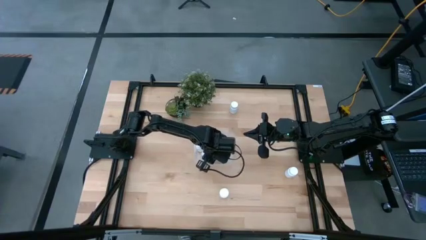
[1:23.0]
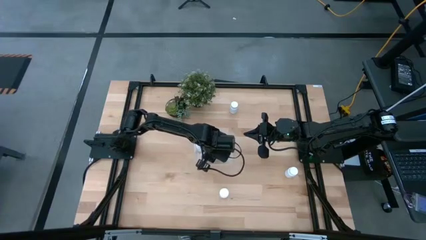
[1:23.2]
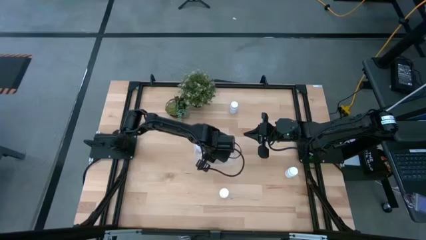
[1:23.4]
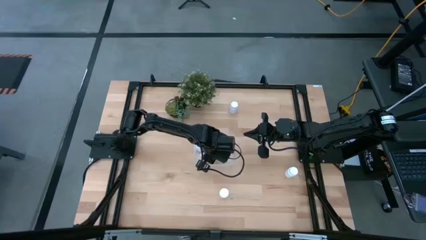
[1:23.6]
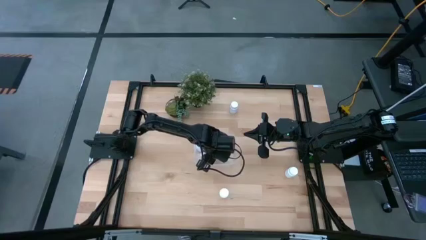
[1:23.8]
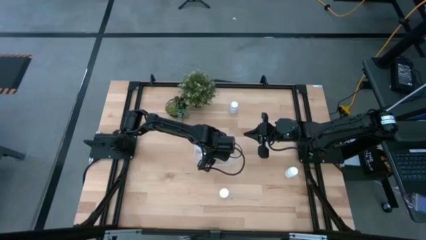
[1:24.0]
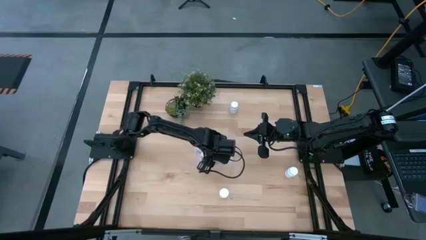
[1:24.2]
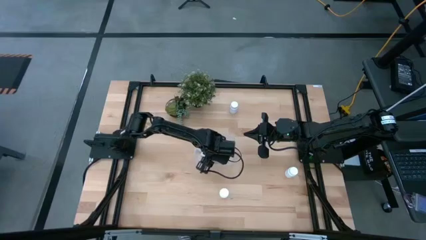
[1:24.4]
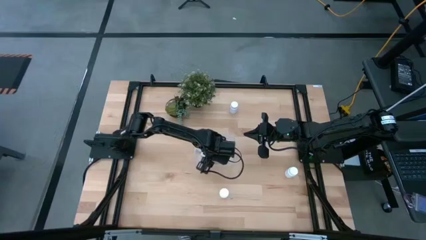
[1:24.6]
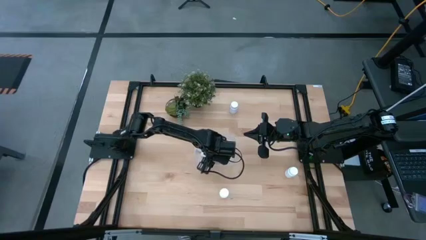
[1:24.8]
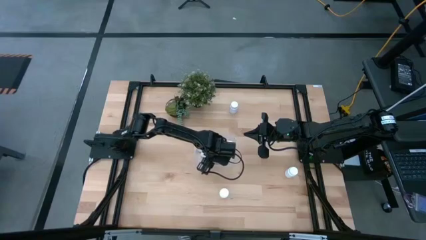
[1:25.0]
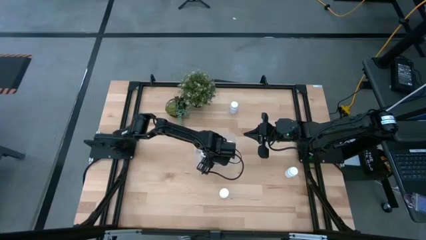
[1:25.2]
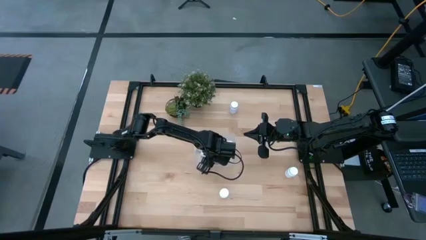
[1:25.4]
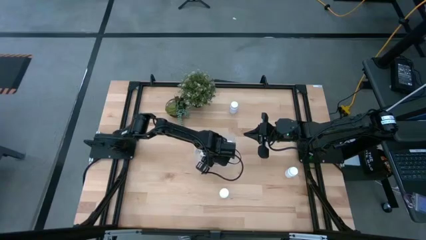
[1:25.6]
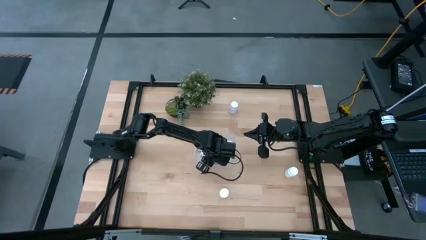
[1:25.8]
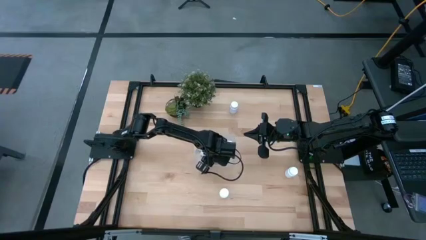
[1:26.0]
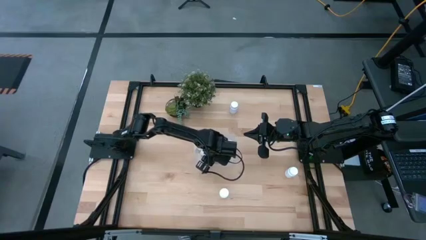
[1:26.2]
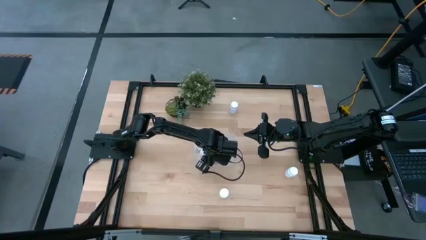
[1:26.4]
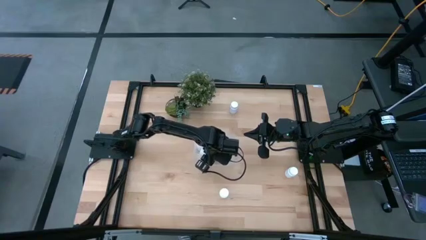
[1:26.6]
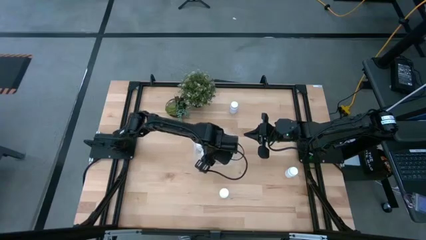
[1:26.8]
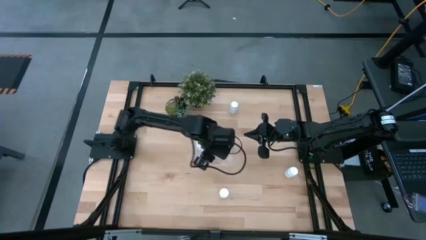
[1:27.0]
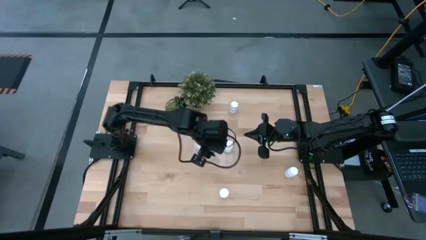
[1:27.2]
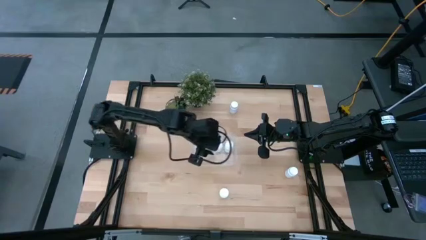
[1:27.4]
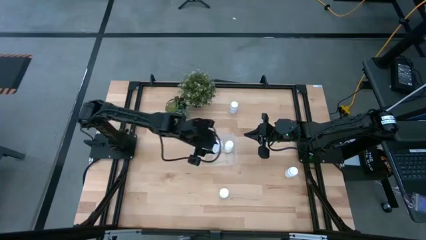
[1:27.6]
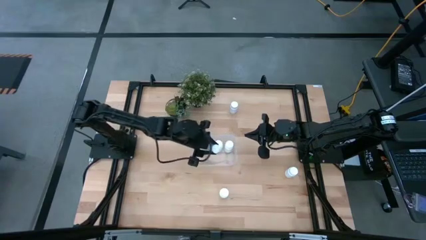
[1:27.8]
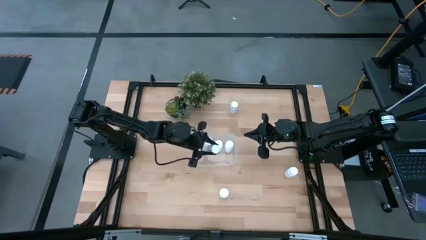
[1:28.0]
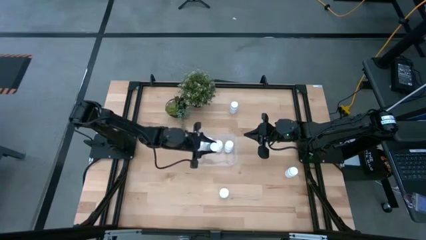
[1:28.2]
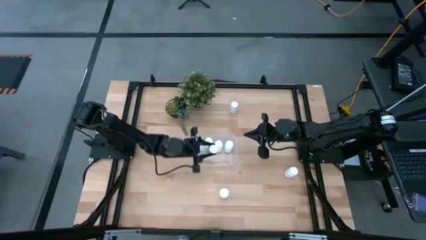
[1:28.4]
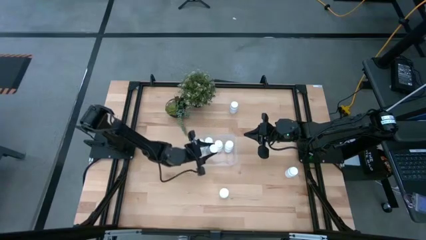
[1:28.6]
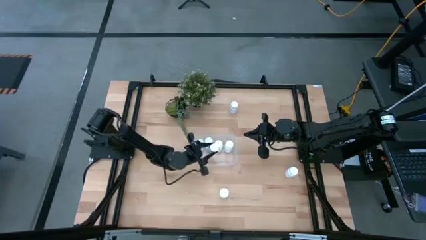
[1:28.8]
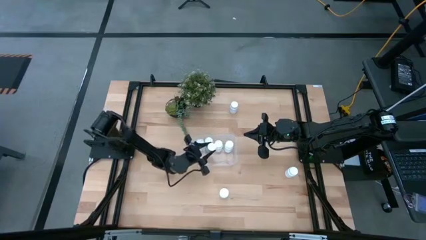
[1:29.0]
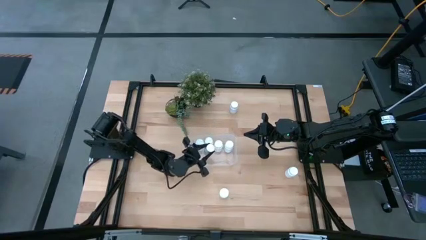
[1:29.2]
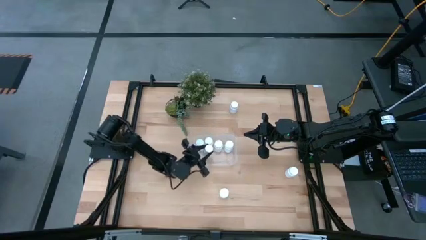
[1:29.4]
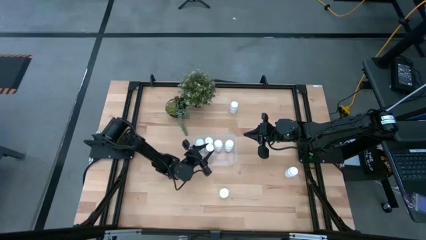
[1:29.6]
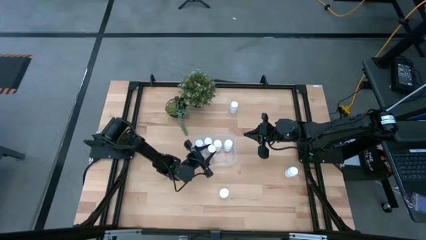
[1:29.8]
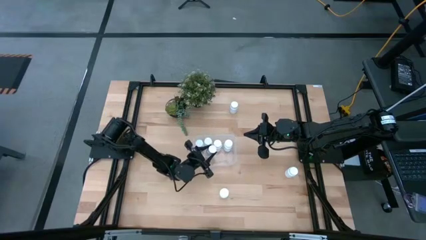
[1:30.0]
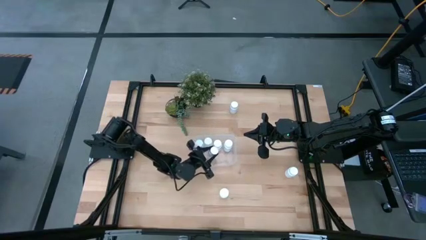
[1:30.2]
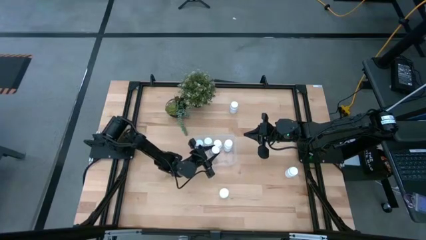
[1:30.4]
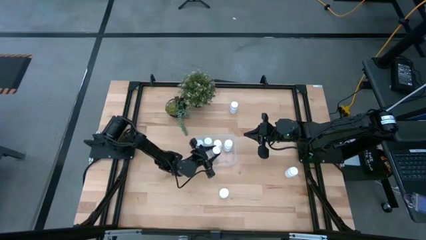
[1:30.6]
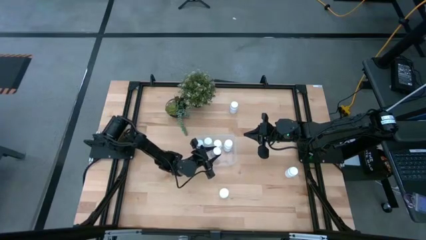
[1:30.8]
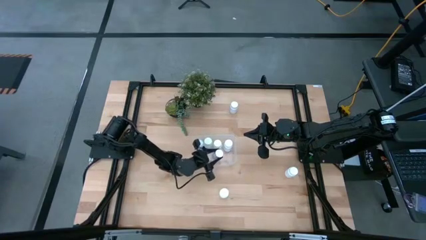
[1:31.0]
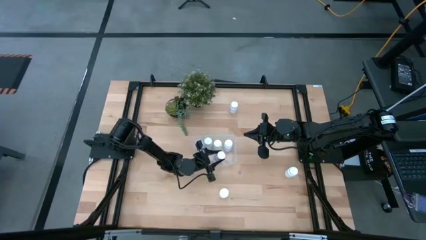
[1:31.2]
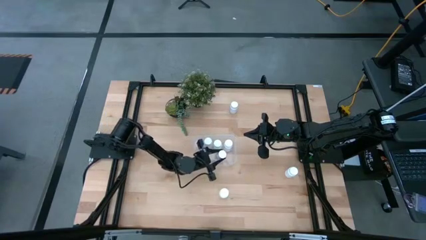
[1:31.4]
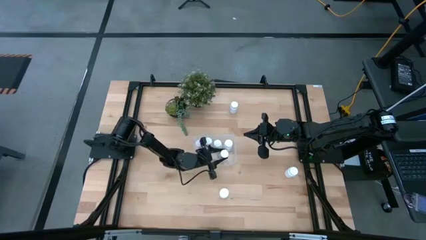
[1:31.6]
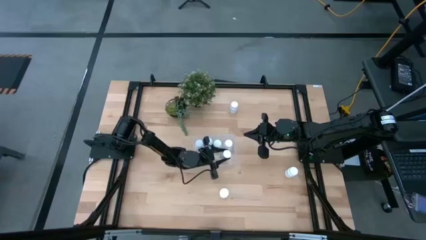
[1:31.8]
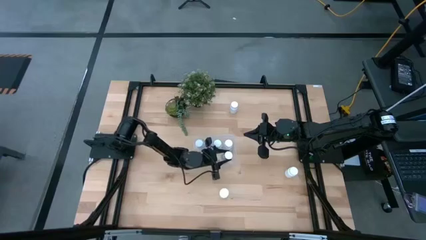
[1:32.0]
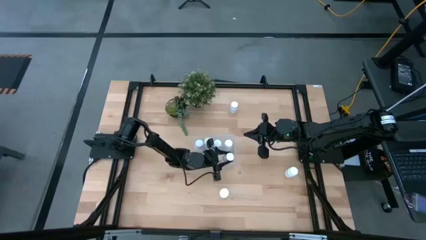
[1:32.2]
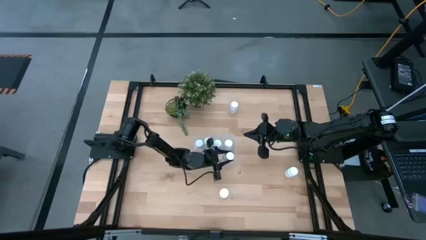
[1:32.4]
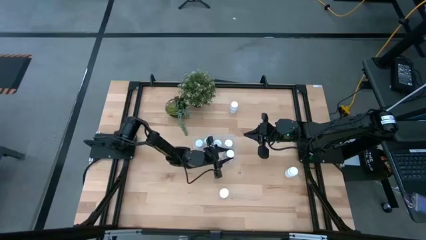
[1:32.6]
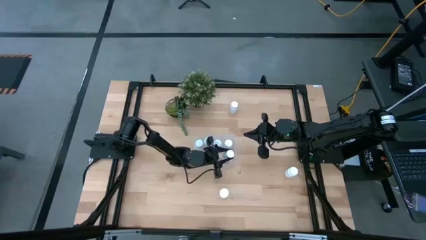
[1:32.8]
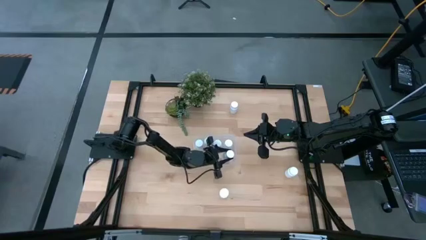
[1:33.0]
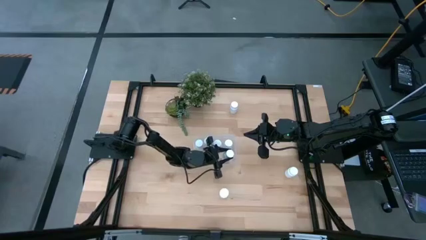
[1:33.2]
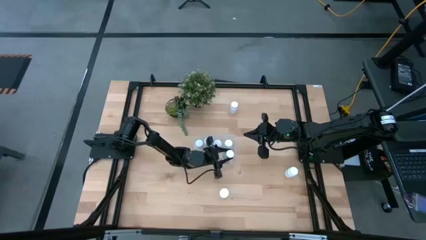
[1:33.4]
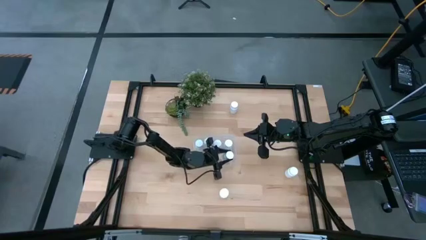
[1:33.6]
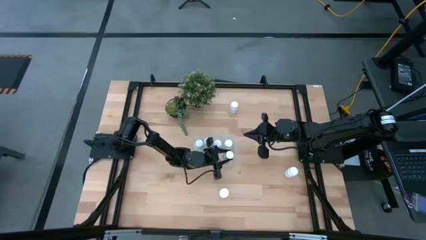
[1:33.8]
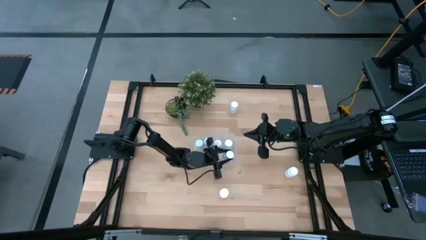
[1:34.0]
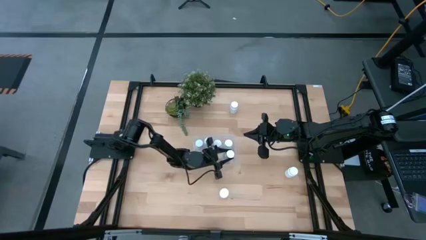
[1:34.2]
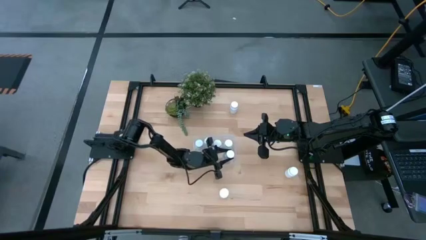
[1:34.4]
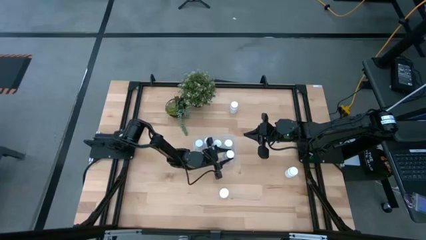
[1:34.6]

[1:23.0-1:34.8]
Task: Pick and place pill bottles into a basket
Put the pill bottle into the bin

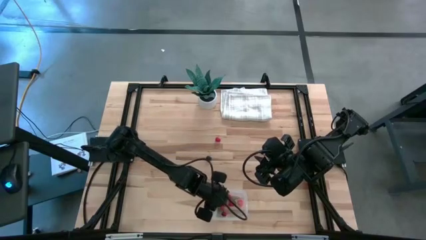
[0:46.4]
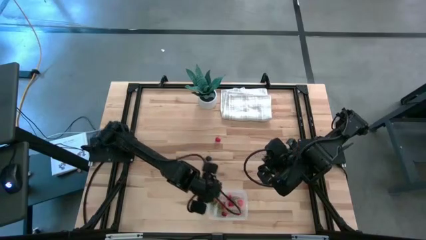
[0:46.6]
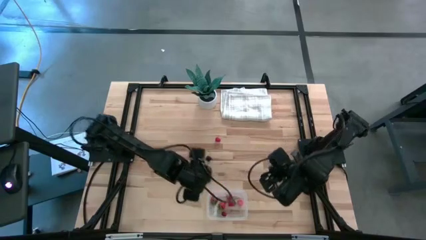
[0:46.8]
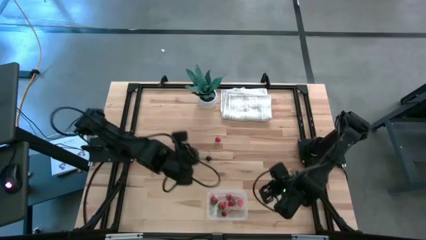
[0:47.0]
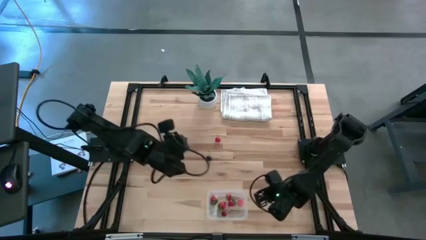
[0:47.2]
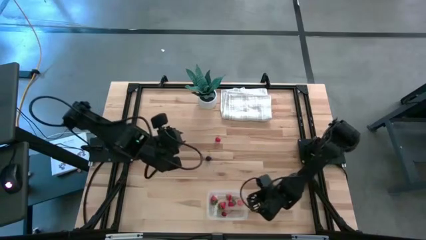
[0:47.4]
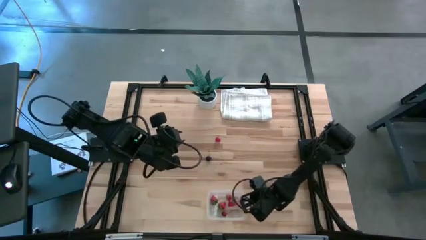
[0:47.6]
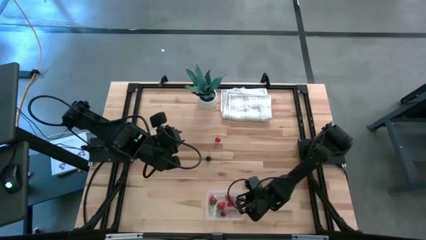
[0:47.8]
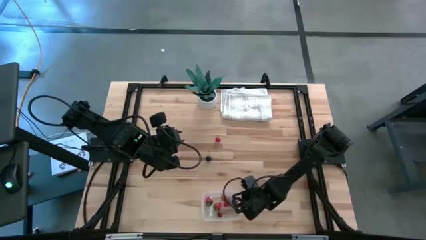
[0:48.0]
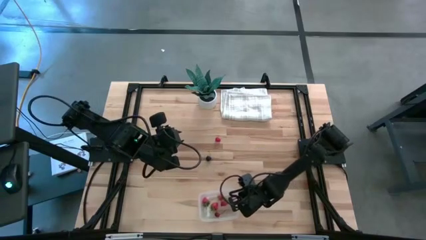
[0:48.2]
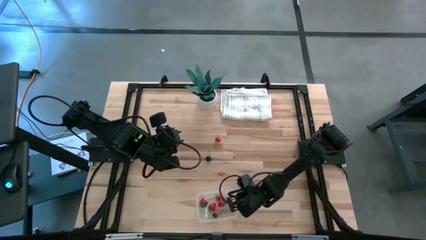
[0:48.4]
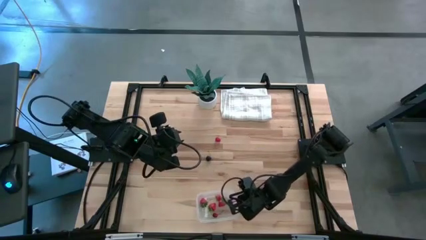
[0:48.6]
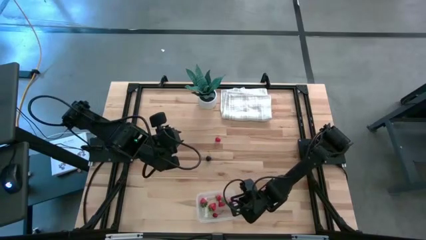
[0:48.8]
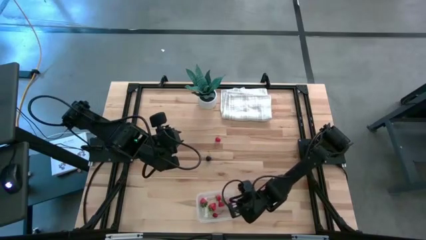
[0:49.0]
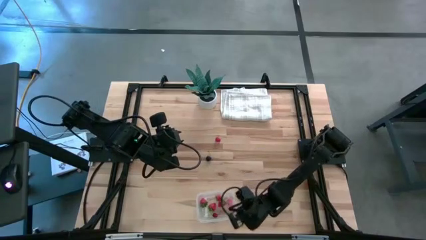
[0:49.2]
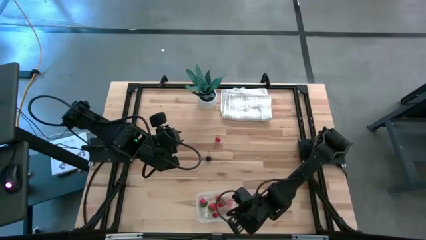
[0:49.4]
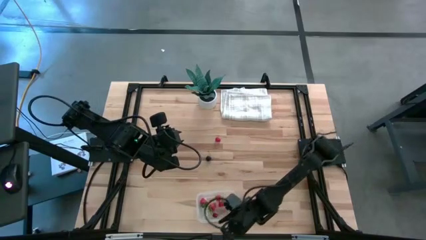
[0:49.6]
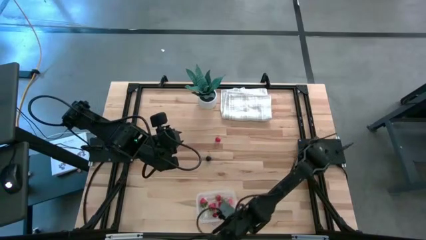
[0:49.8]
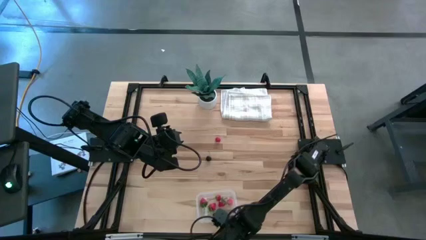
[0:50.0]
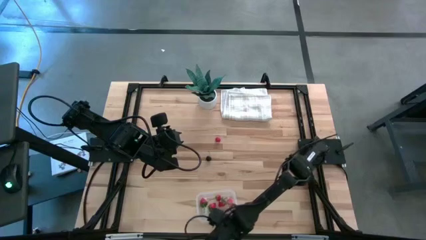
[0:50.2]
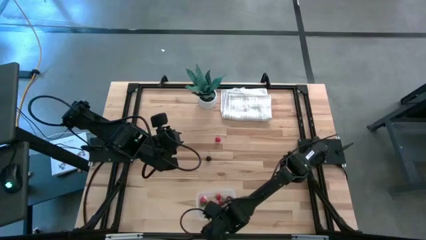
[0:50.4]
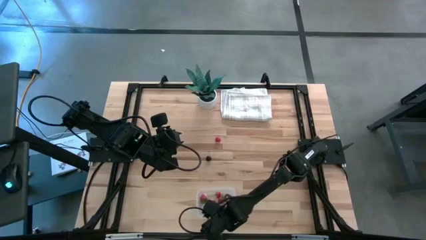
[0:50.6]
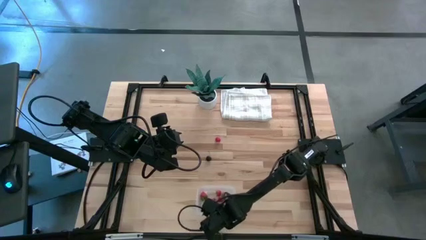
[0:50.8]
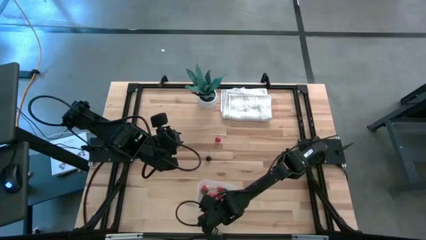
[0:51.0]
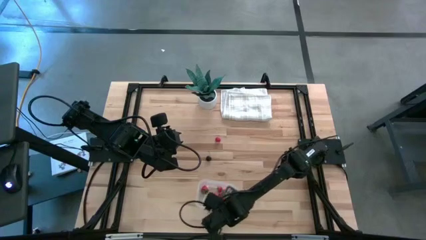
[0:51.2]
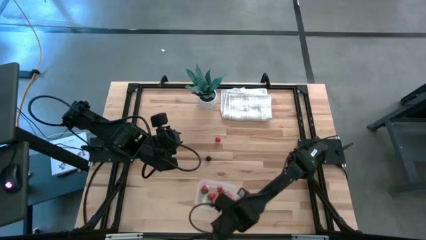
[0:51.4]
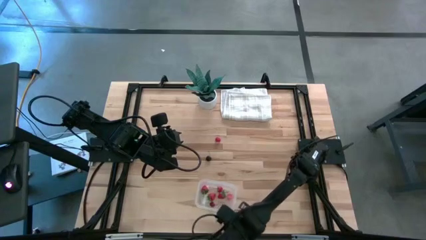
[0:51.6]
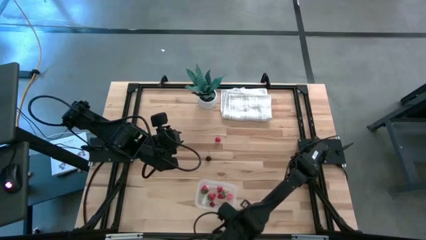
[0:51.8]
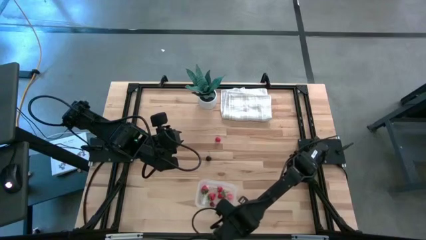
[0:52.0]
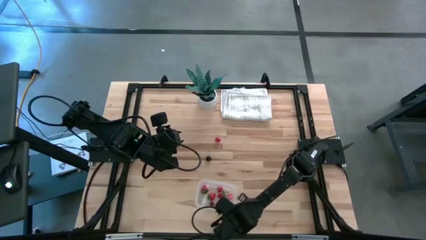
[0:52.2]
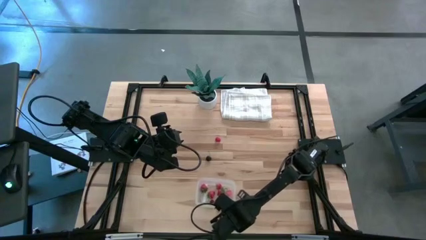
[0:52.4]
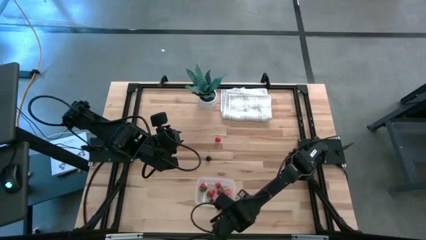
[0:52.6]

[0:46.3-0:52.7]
Task: Pick and placing Produce into tupperware
Adjust the transparent bin
